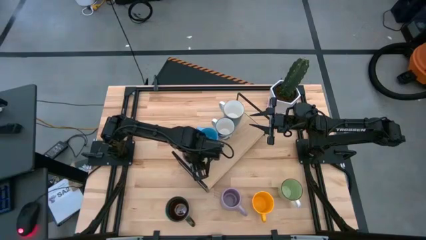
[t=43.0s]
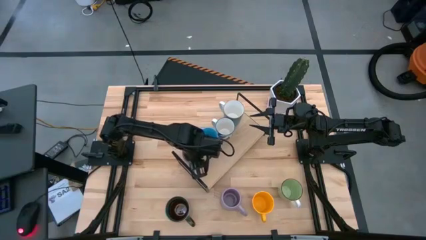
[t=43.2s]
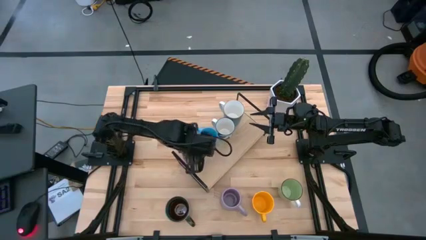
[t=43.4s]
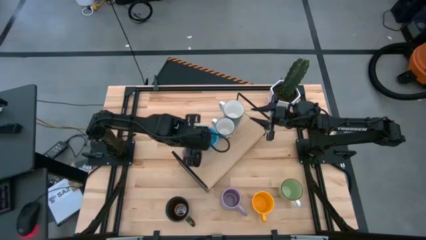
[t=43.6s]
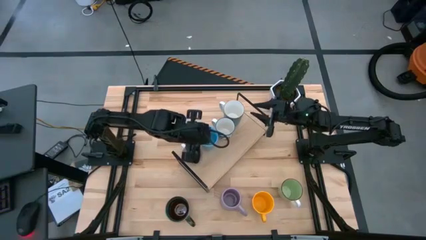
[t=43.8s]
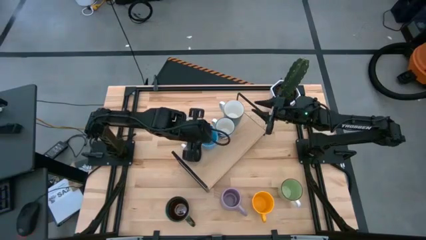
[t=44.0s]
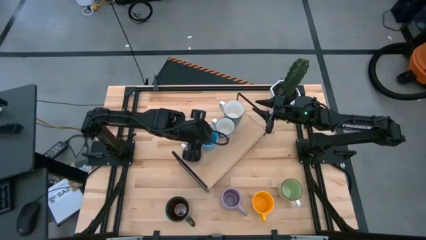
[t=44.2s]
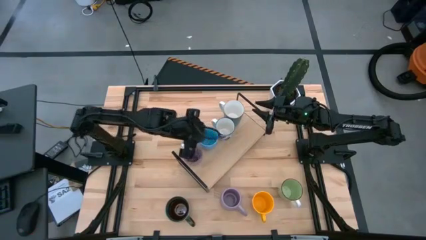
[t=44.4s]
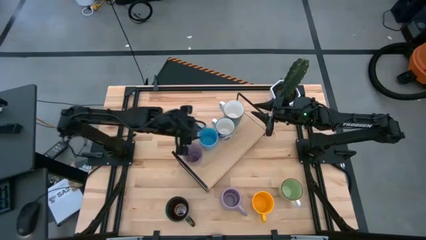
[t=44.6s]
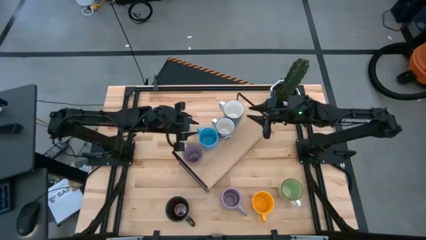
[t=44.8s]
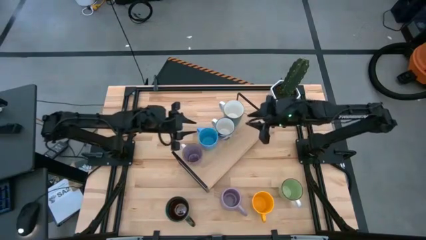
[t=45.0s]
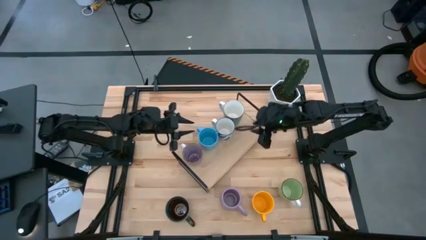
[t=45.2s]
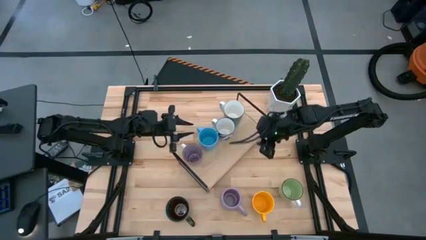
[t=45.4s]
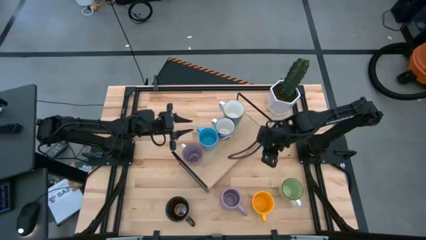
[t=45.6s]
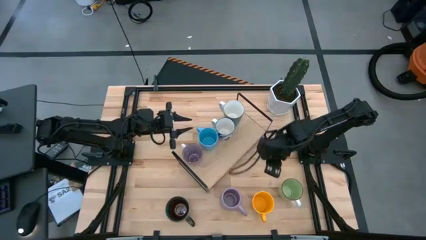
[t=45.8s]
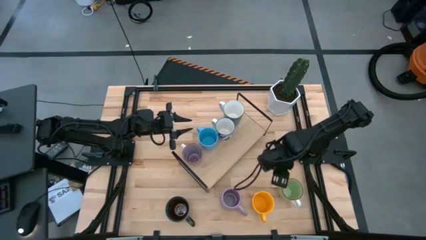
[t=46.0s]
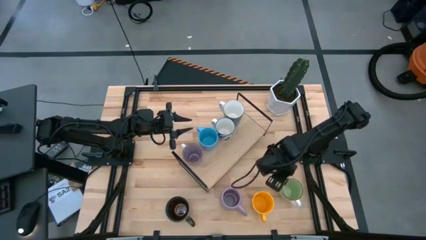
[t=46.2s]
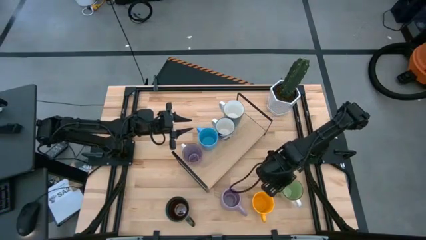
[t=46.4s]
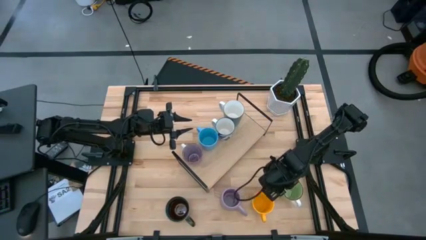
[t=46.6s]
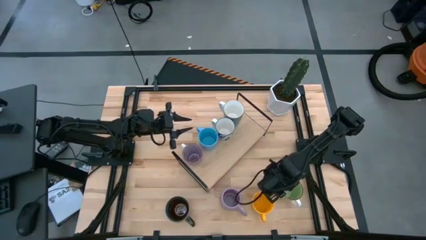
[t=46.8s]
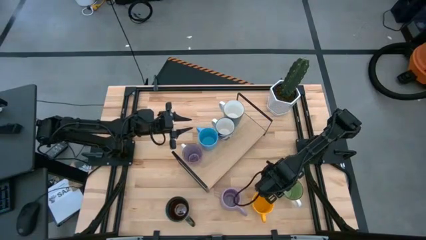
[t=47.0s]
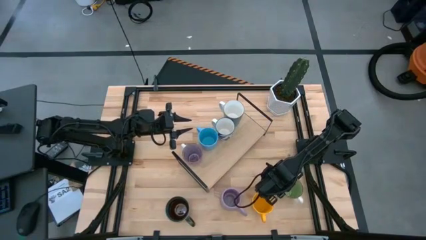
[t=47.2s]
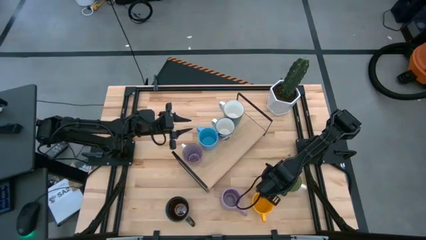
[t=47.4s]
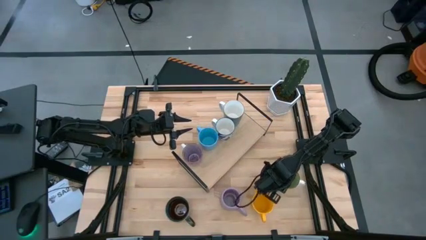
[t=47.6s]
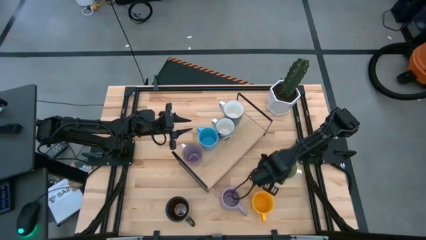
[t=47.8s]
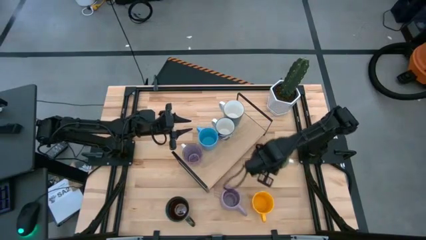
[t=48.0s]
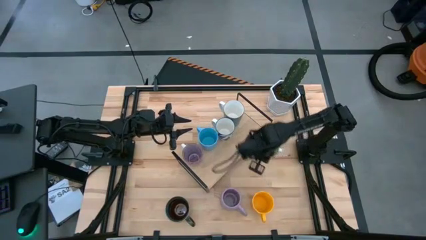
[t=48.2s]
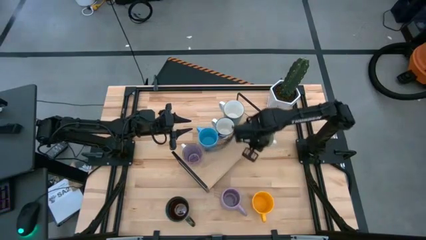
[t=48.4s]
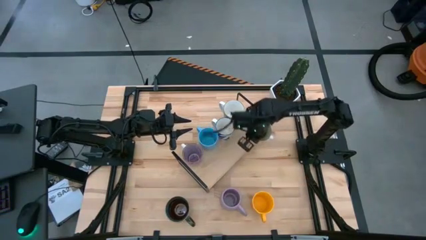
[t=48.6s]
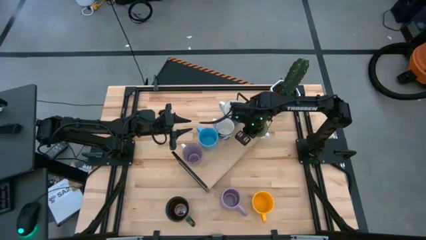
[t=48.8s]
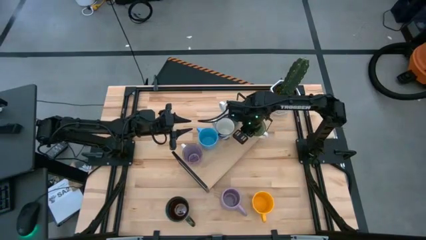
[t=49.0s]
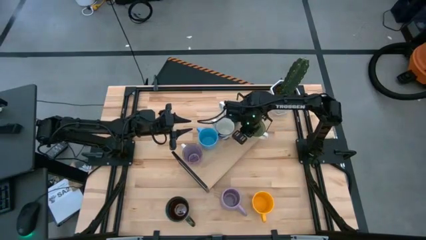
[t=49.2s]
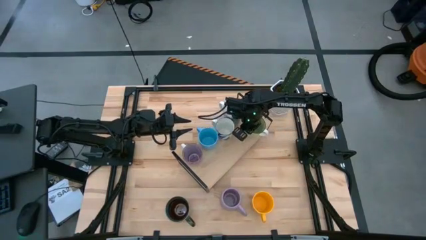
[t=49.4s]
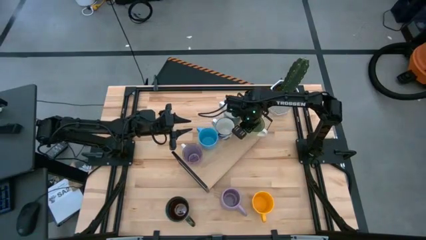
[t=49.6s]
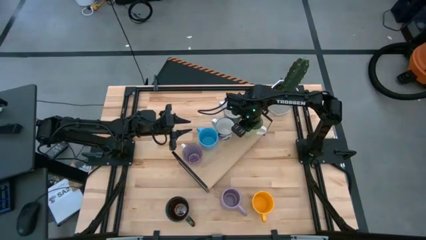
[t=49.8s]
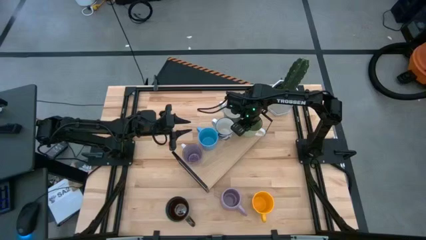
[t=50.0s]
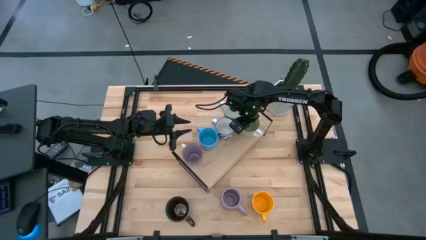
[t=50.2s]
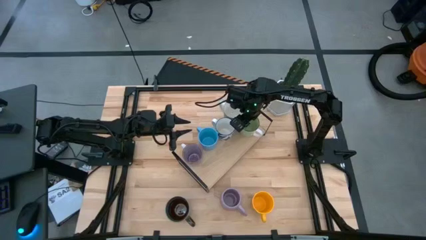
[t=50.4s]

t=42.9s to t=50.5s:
Task: Place coffee mugs
Put the green mug on the shelf aligned with the middle green mug

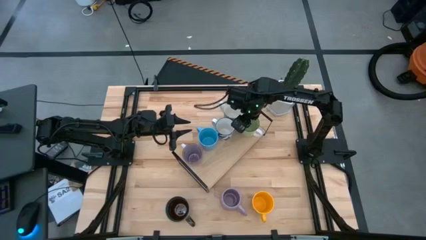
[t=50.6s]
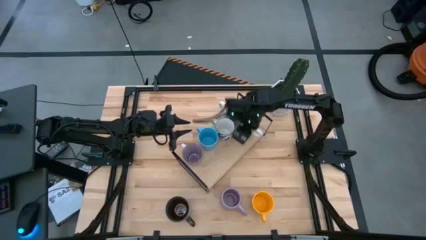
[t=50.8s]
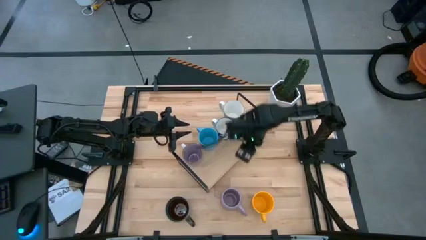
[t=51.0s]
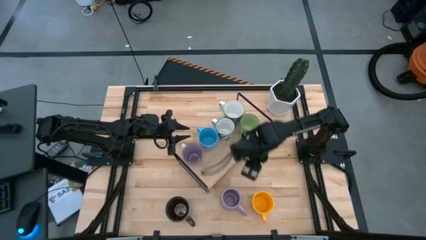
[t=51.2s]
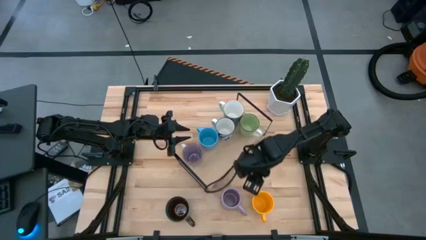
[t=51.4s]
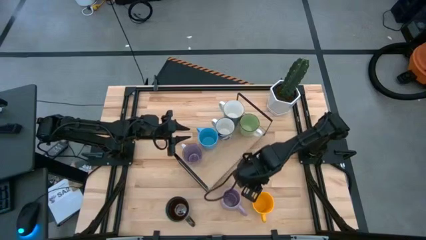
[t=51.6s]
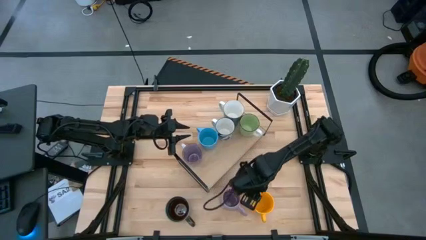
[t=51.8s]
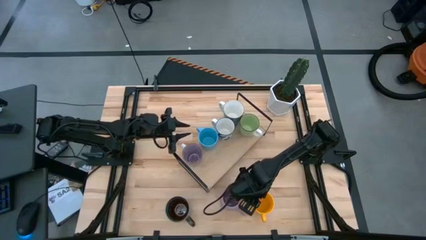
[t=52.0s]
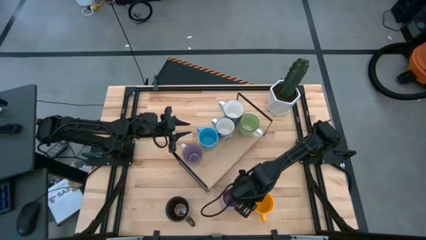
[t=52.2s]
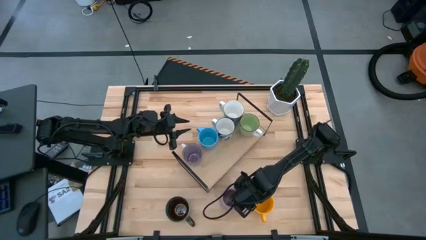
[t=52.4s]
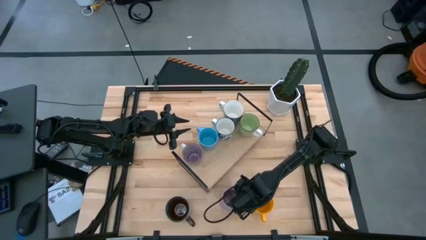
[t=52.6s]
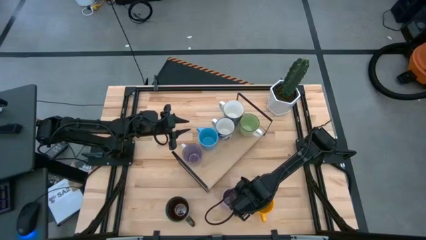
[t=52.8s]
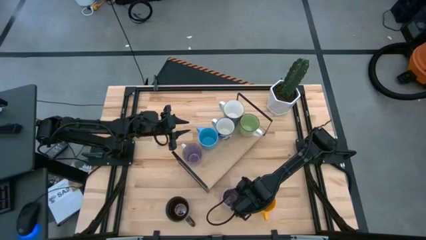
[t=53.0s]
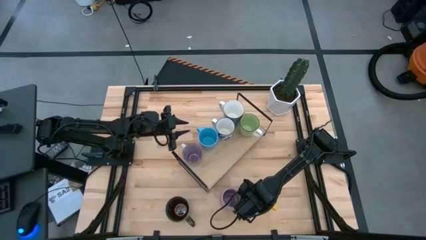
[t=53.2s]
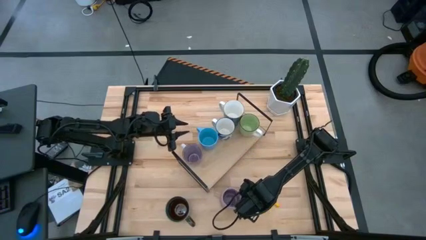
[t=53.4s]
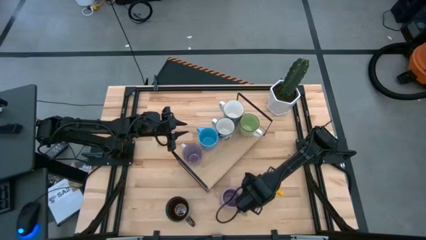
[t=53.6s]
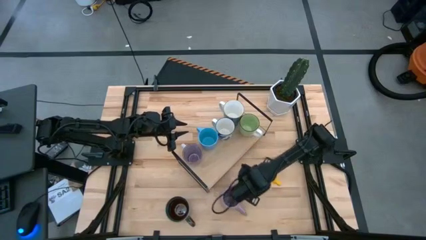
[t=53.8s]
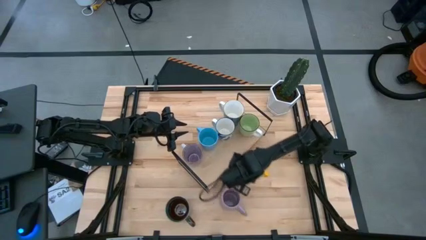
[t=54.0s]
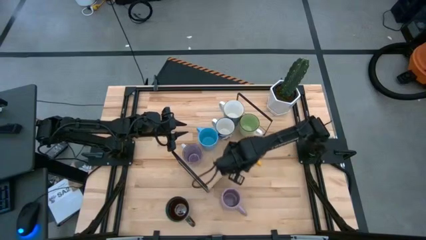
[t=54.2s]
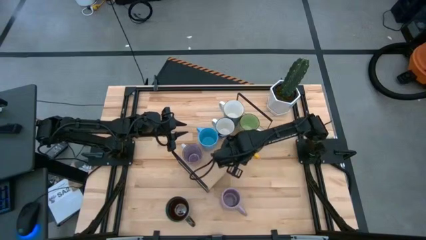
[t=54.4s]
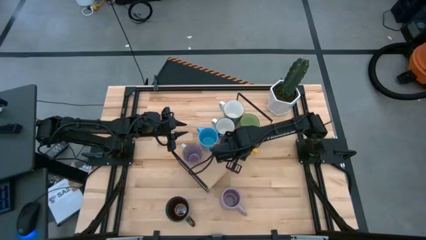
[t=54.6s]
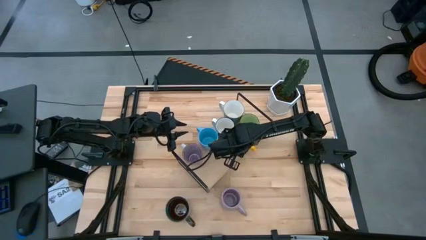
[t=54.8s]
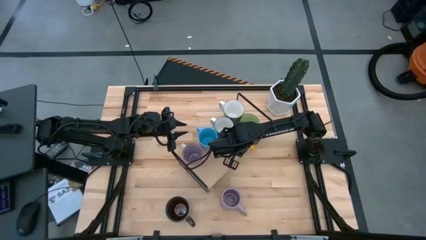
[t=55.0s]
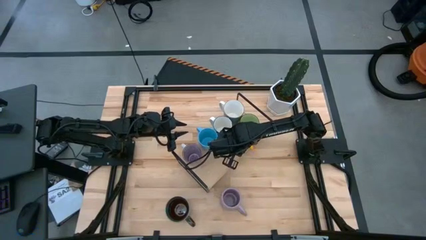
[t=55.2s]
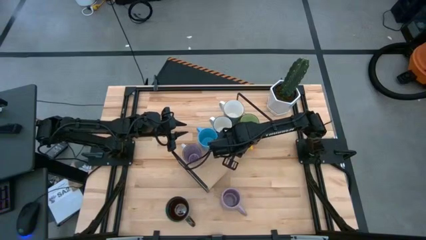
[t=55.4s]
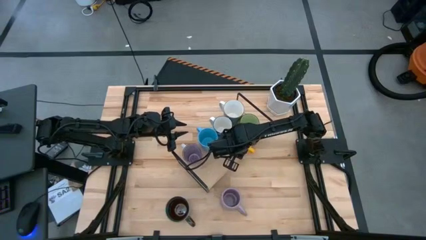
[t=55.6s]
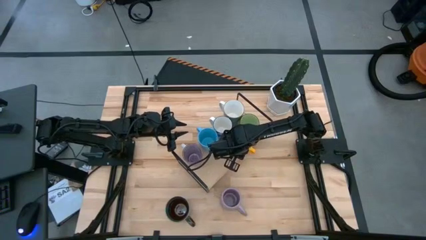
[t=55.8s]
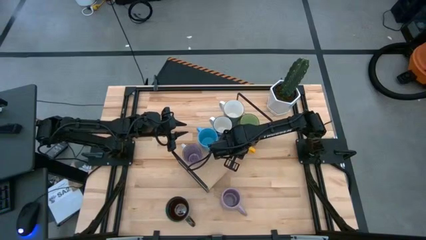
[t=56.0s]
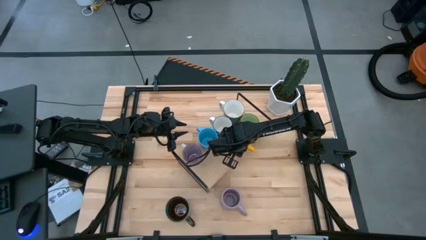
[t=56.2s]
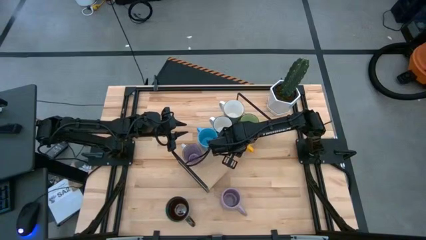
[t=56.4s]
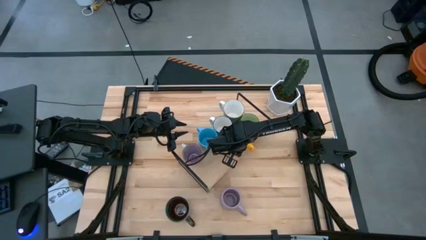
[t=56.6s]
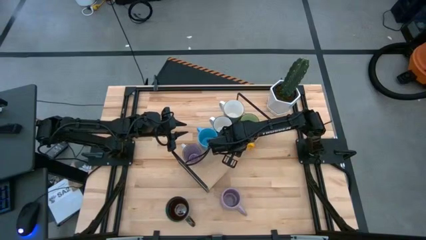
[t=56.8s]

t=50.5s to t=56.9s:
Put the yellow mug on the shelf aligned with the blue mug
